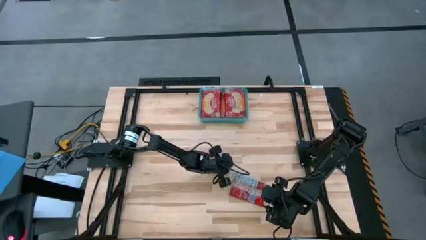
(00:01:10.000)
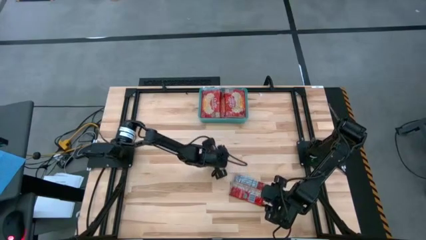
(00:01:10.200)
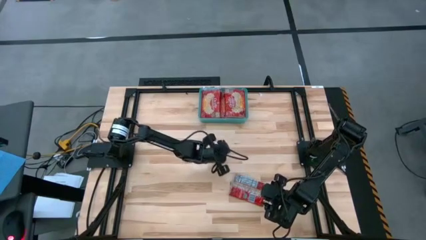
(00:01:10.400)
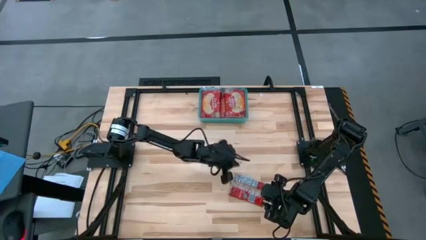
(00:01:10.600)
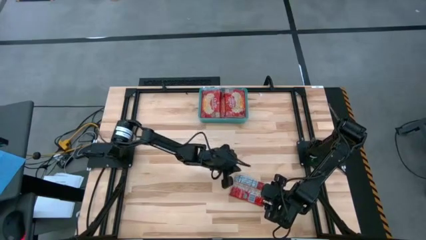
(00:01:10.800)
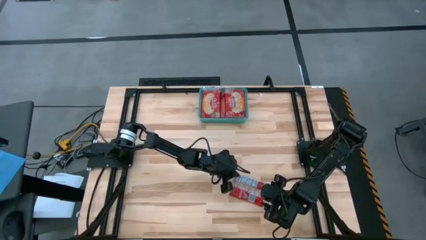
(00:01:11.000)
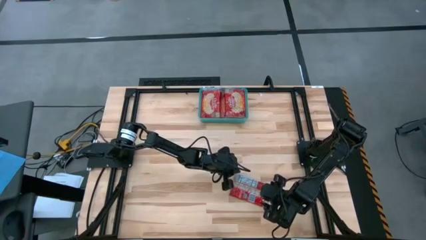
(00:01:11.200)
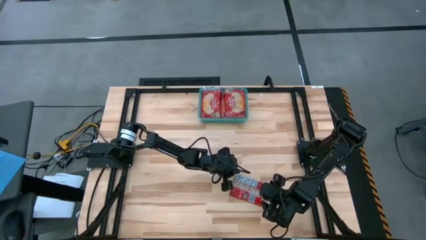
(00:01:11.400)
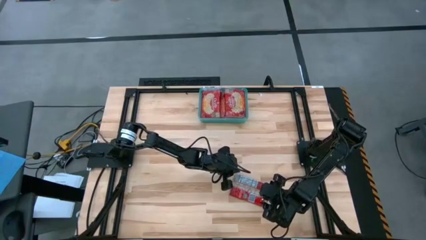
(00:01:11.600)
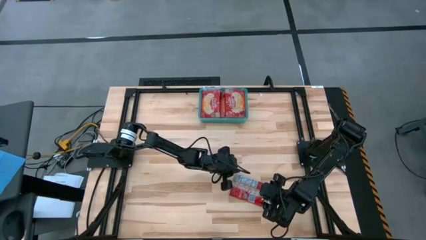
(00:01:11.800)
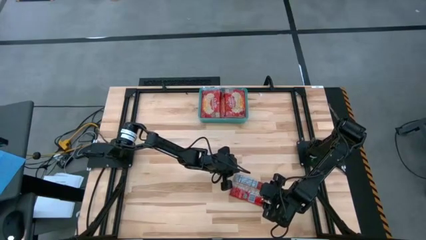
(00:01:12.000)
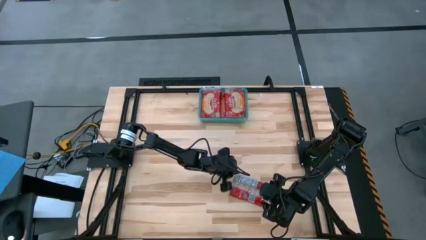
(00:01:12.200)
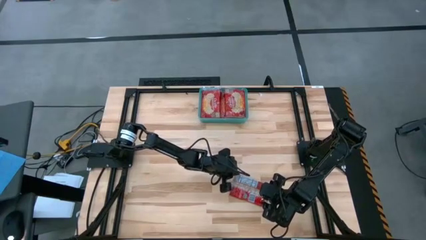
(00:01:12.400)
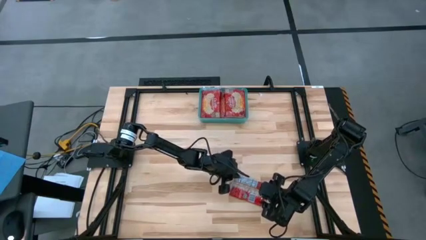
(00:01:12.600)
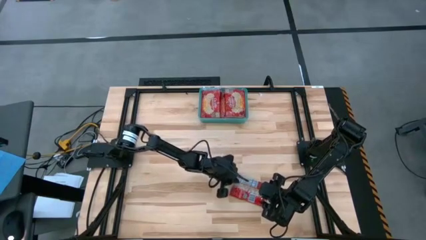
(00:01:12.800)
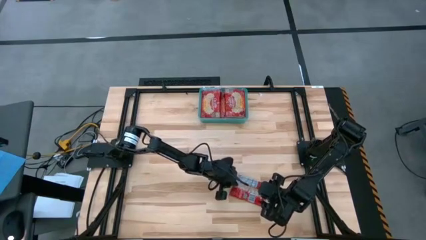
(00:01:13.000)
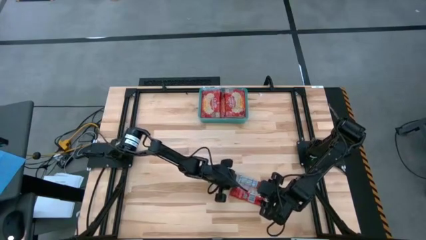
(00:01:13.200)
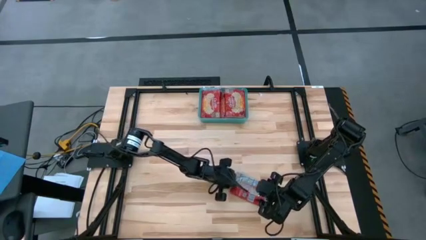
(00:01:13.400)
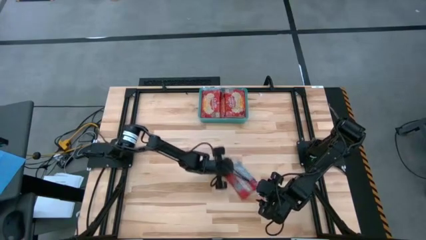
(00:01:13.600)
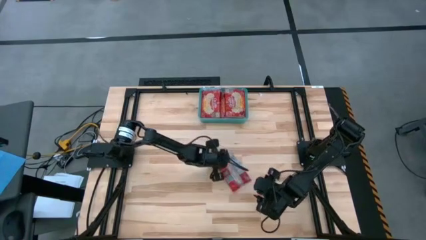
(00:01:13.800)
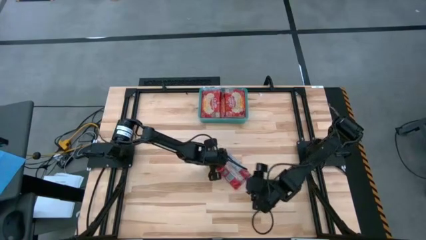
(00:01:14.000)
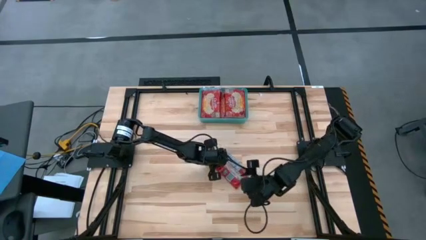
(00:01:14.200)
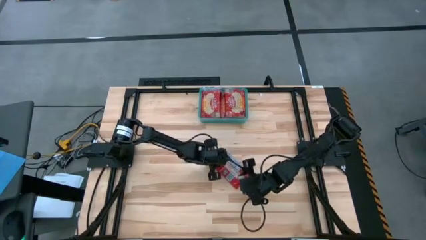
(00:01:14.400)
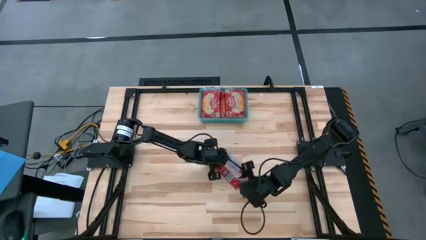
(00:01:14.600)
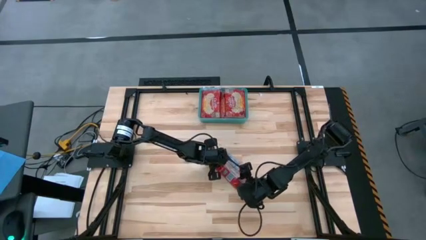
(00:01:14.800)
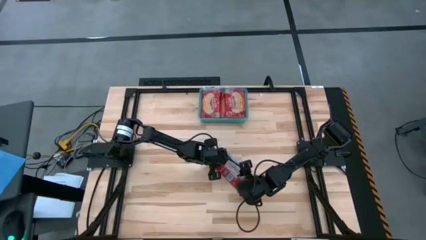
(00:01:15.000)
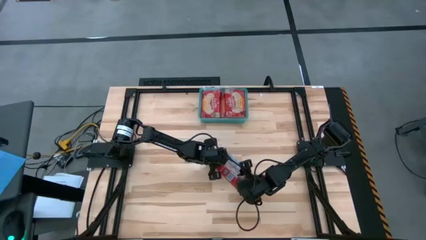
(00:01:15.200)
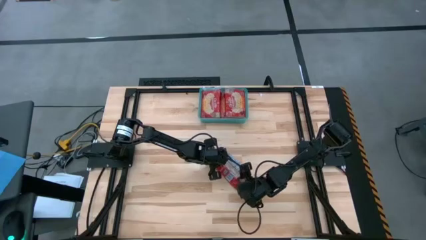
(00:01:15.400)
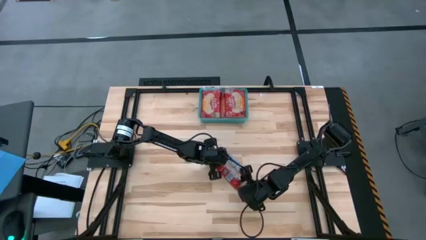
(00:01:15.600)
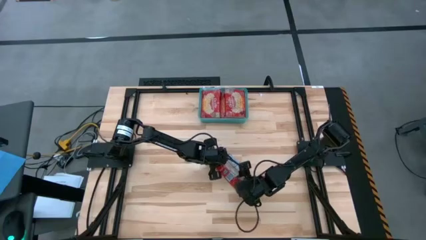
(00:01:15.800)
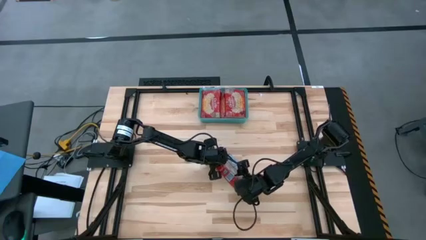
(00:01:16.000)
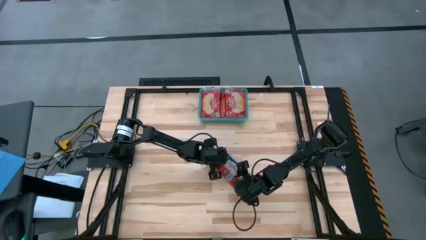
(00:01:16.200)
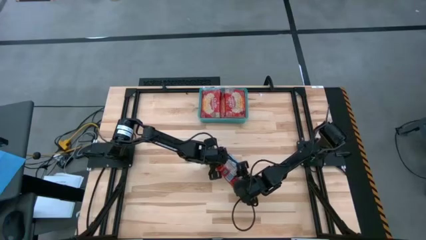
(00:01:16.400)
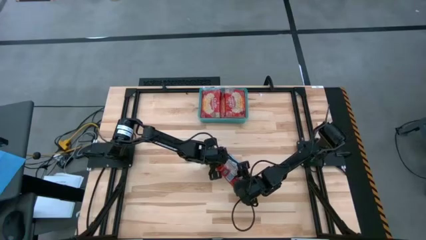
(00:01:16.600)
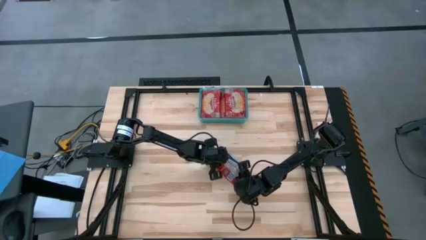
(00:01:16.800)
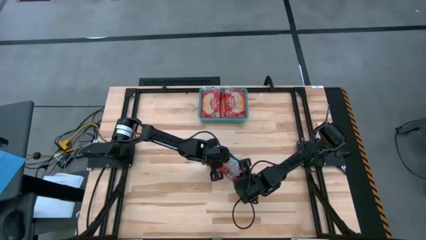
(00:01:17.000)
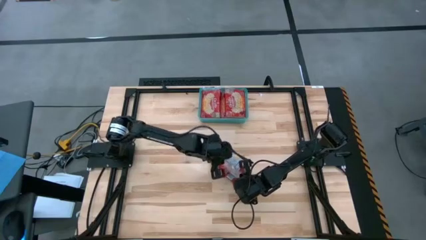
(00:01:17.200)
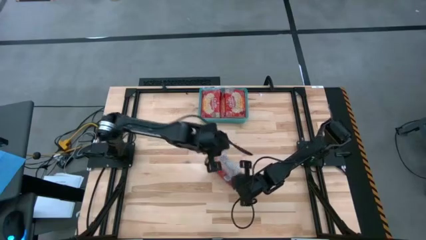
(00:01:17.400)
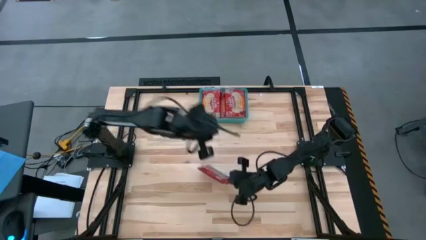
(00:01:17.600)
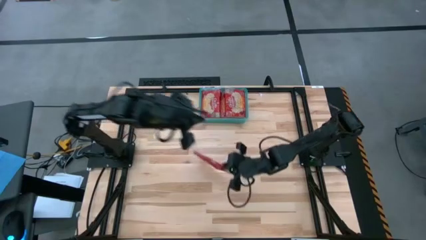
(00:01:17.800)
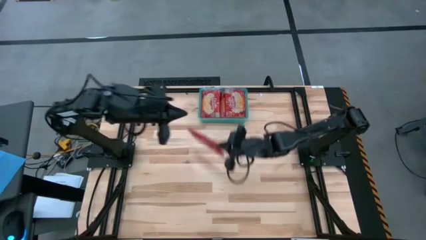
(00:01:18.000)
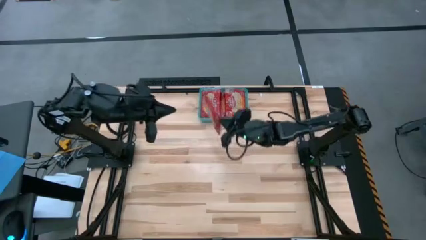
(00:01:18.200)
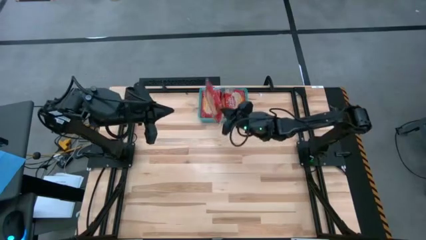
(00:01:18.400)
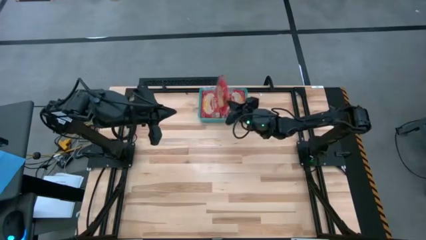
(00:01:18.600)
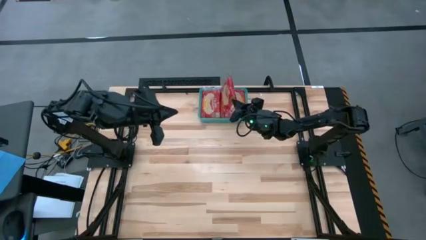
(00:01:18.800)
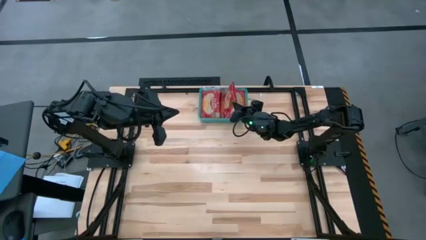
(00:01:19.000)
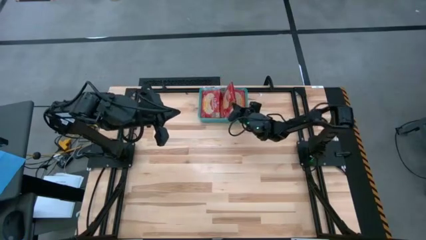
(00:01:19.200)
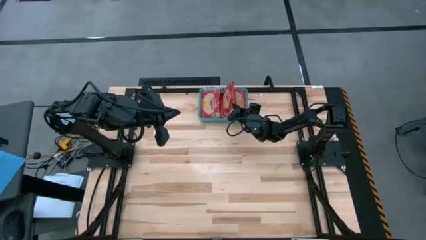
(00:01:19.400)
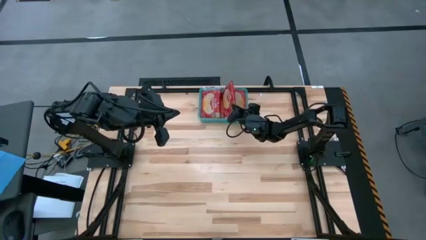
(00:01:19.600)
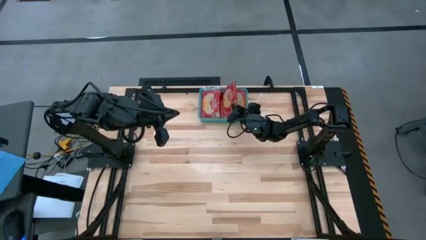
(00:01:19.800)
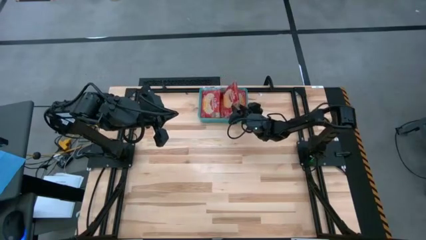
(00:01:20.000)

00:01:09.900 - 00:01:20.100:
Task: Sort popcorn bags into baskets
Put the red popcorn bag into the green bin

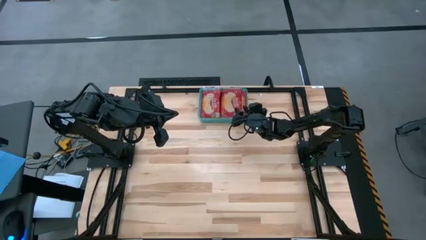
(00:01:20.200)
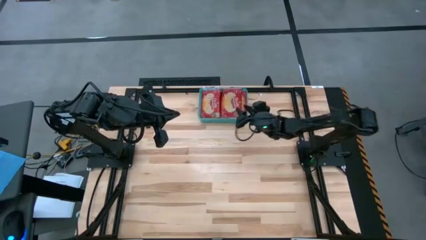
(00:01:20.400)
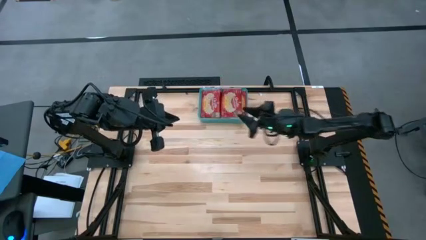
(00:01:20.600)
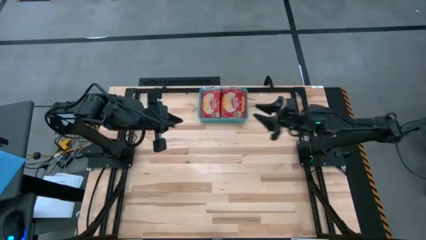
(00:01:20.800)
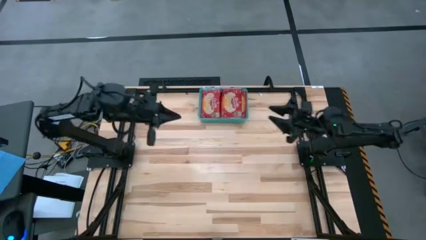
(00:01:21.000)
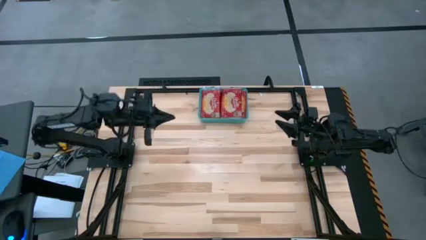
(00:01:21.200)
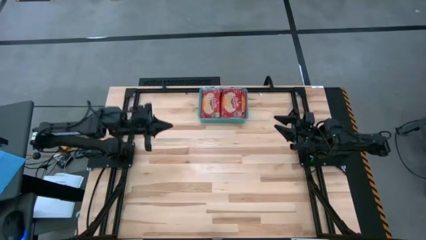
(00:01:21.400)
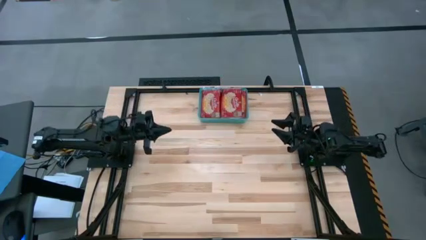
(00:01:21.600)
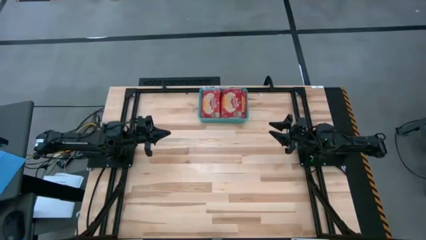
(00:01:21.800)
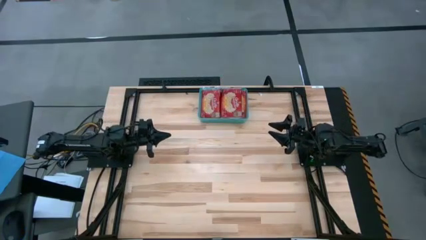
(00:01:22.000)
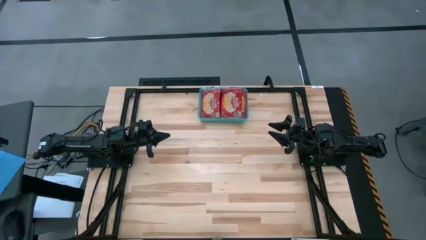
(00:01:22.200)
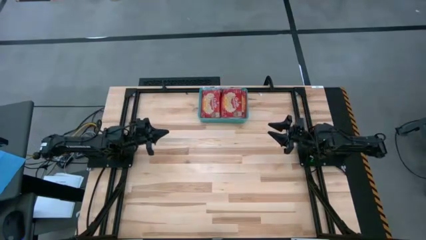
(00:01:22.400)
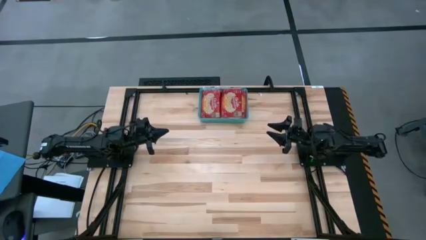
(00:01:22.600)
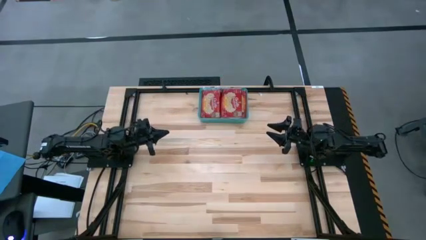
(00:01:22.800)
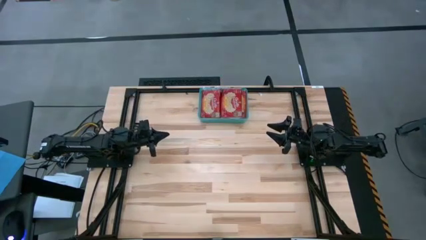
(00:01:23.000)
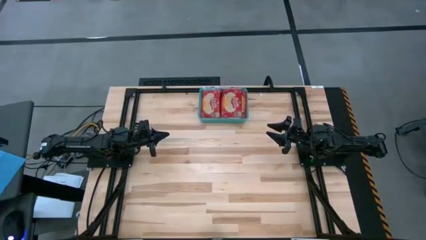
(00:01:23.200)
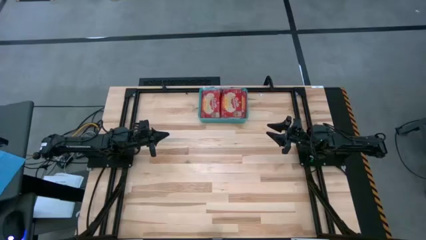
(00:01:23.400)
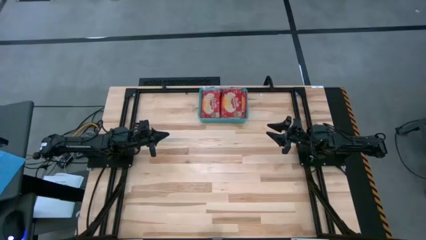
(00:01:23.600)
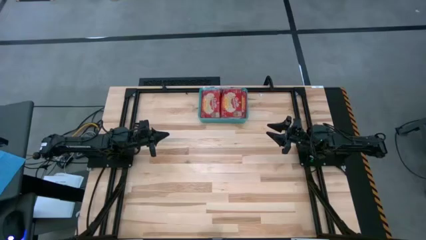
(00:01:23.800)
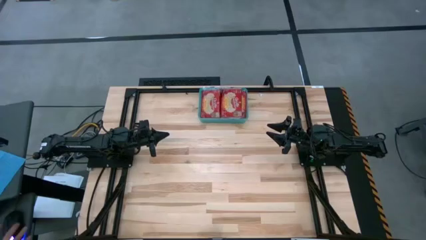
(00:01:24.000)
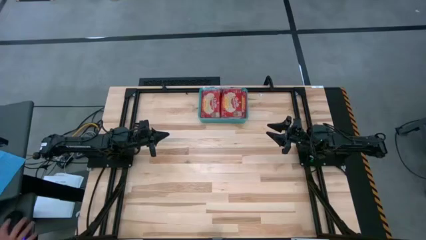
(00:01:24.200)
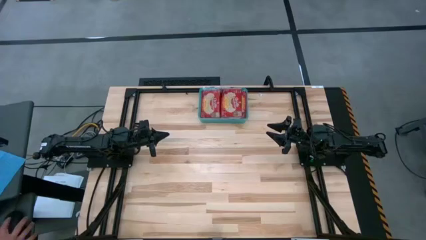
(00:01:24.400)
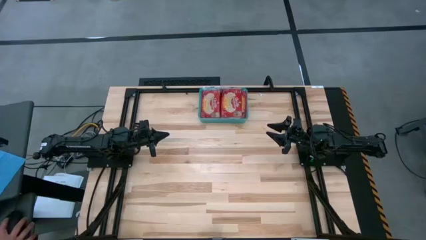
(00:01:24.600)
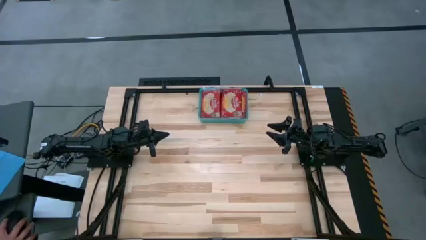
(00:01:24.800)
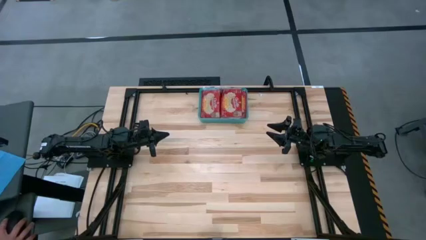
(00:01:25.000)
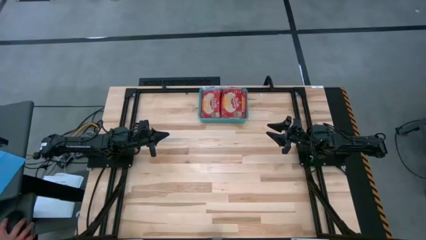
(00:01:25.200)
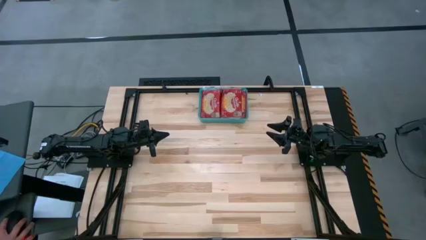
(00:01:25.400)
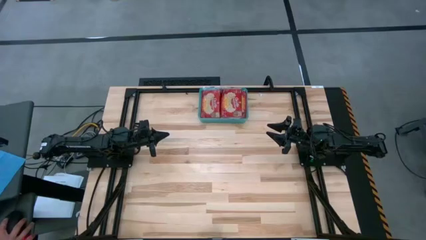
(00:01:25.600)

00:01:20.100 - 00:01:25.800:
Return to Home Position
